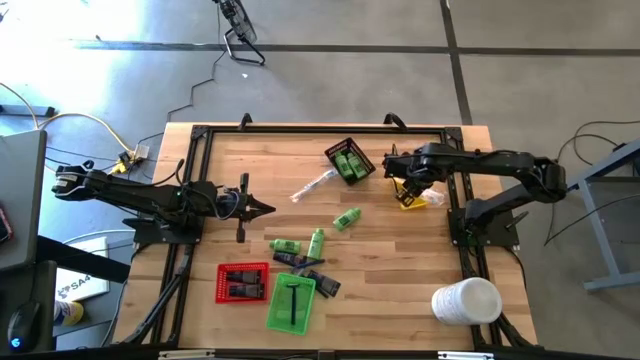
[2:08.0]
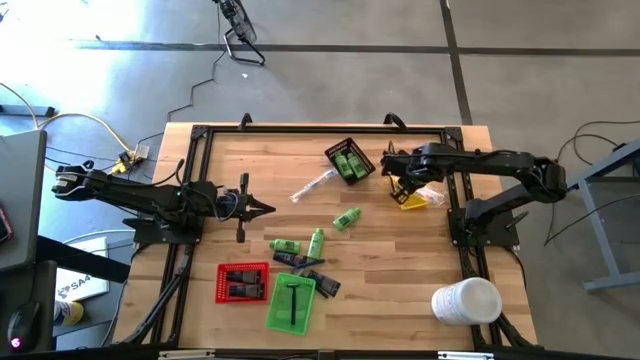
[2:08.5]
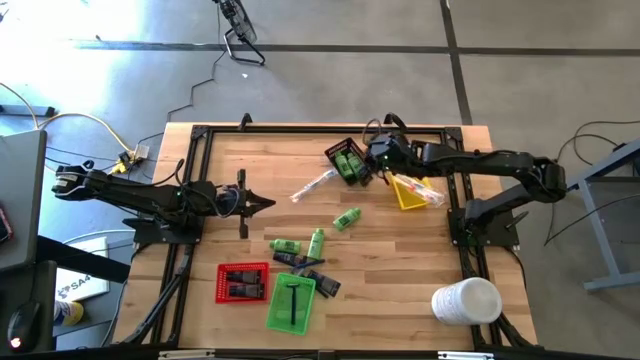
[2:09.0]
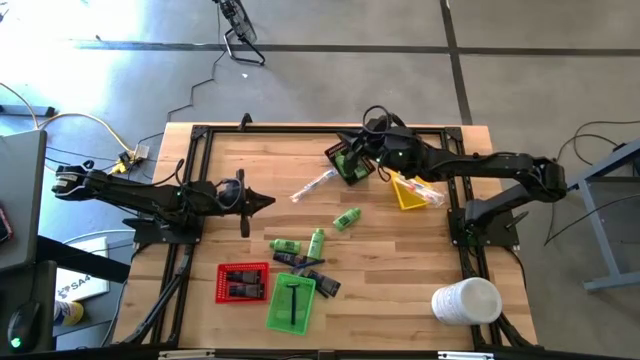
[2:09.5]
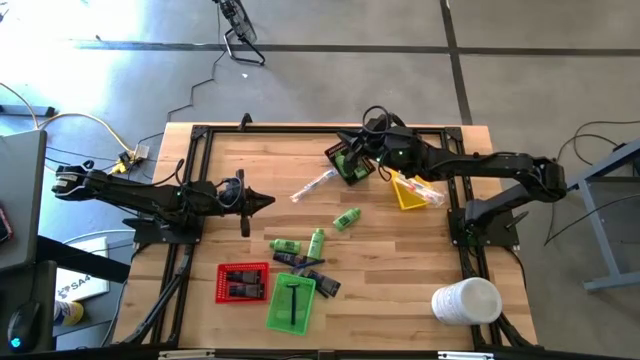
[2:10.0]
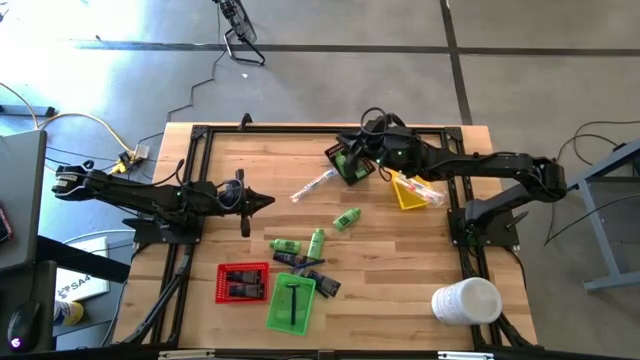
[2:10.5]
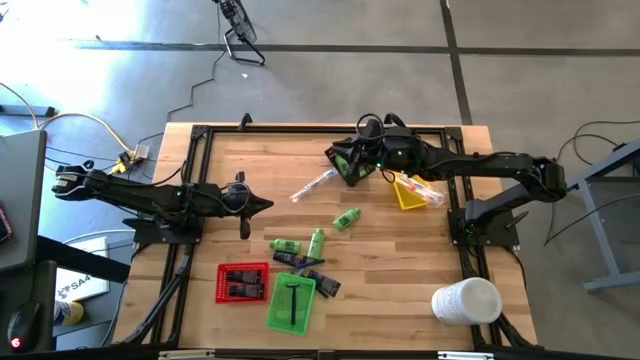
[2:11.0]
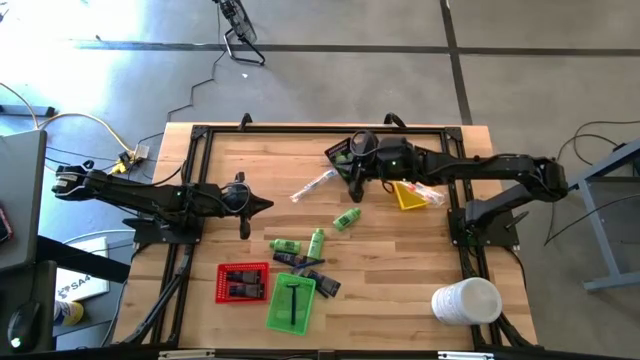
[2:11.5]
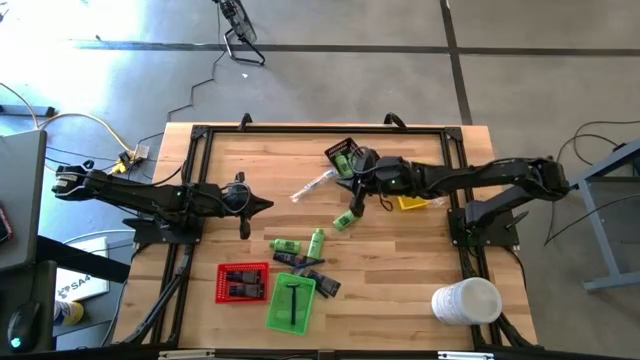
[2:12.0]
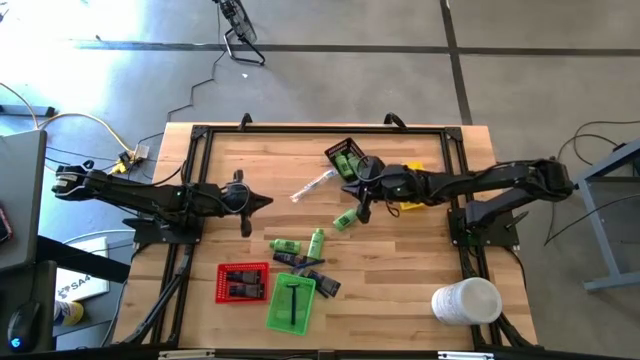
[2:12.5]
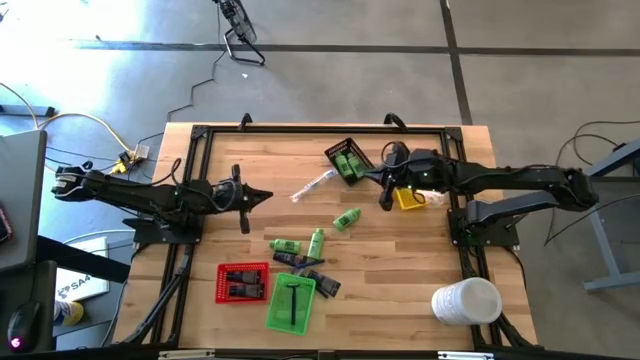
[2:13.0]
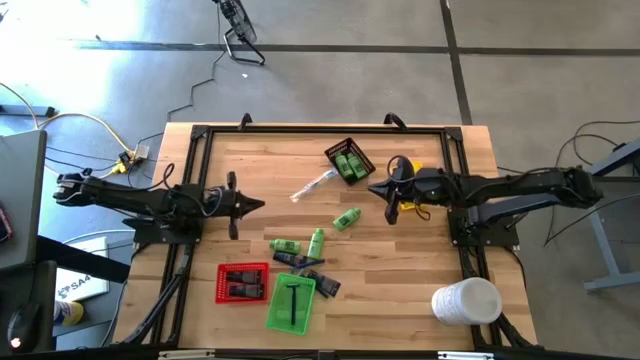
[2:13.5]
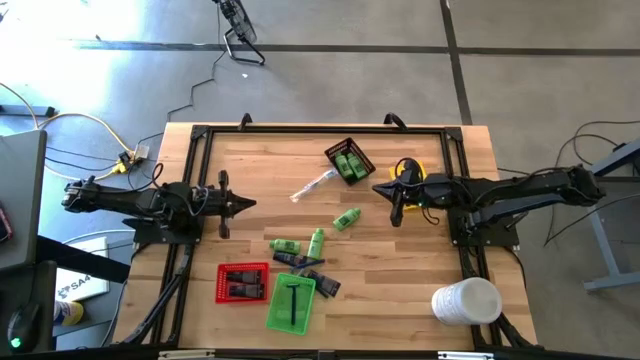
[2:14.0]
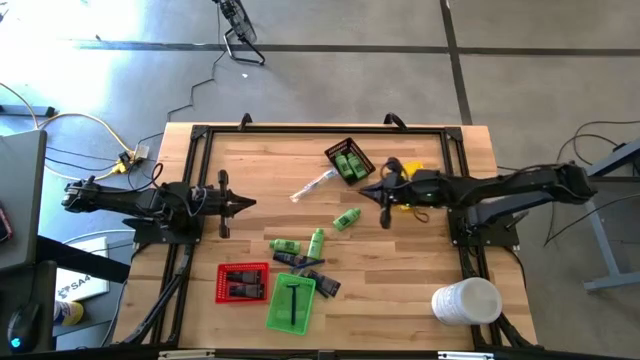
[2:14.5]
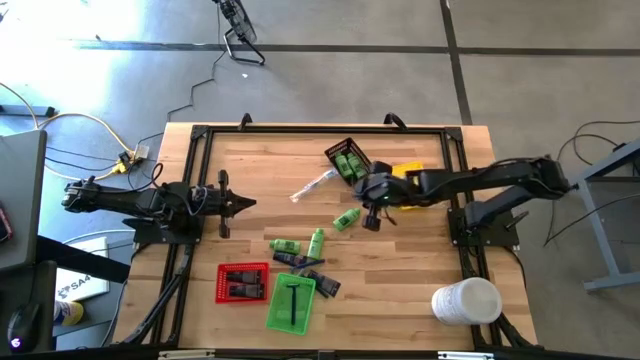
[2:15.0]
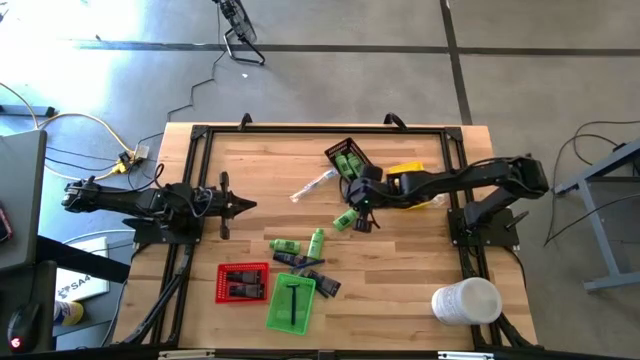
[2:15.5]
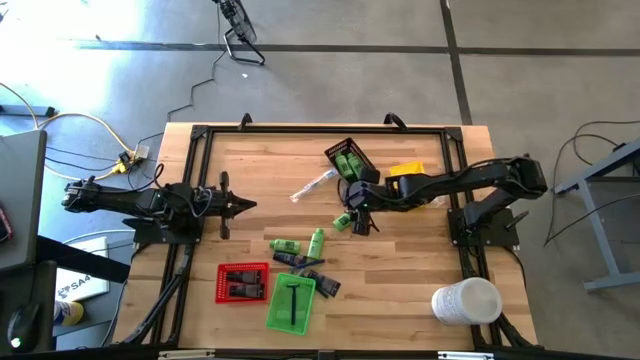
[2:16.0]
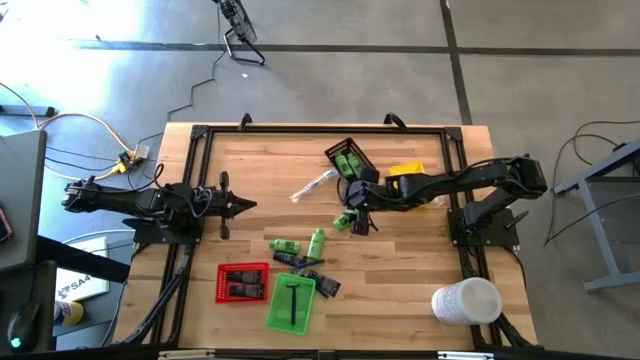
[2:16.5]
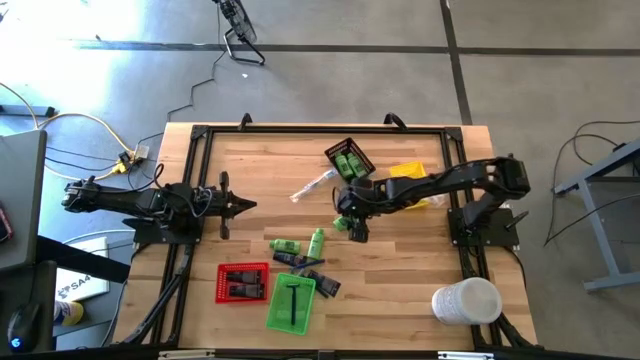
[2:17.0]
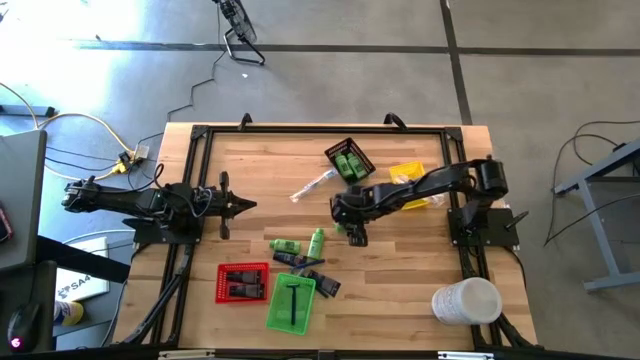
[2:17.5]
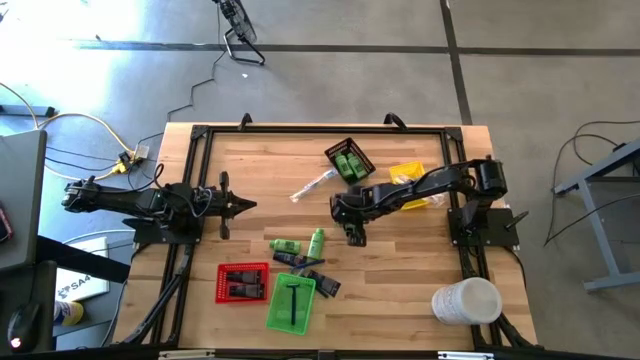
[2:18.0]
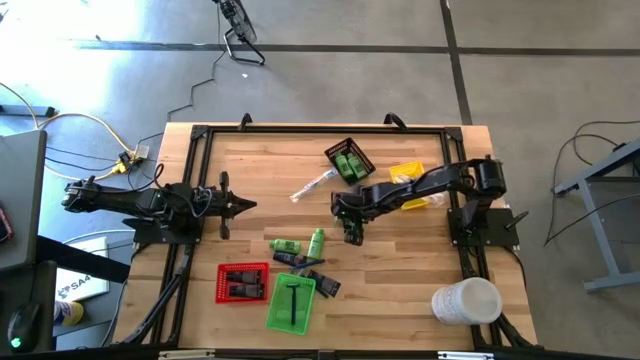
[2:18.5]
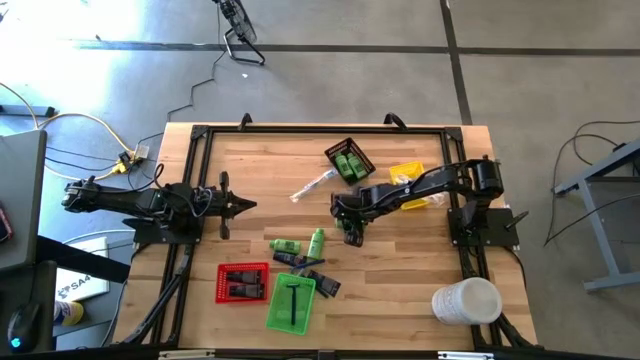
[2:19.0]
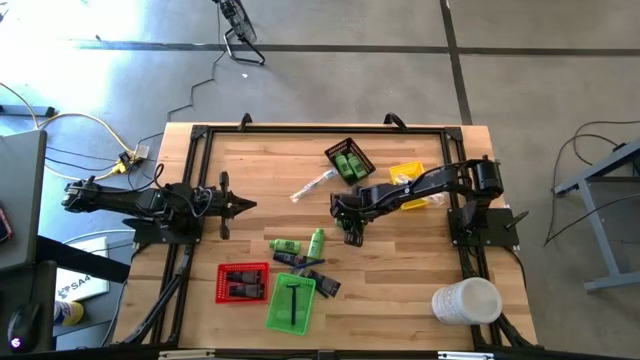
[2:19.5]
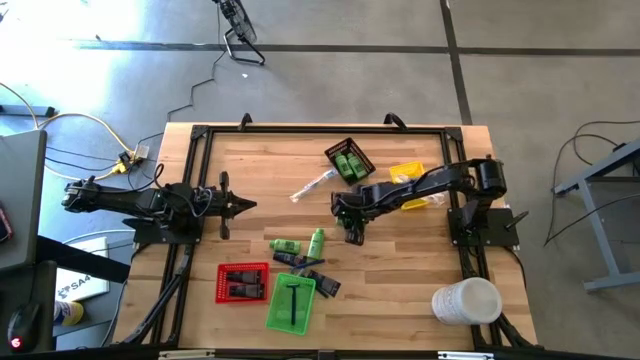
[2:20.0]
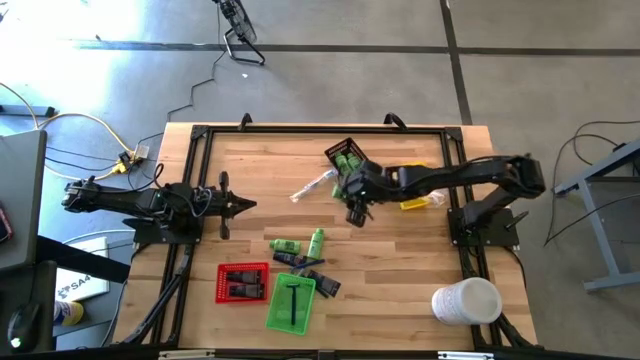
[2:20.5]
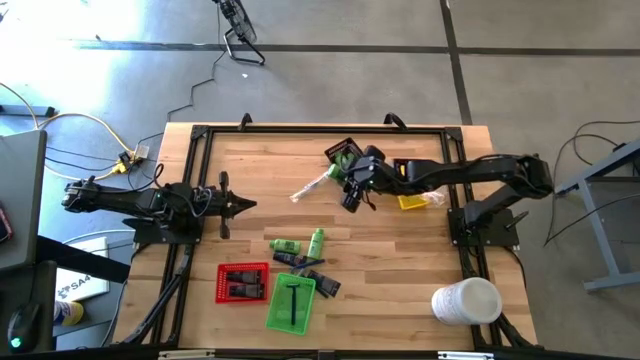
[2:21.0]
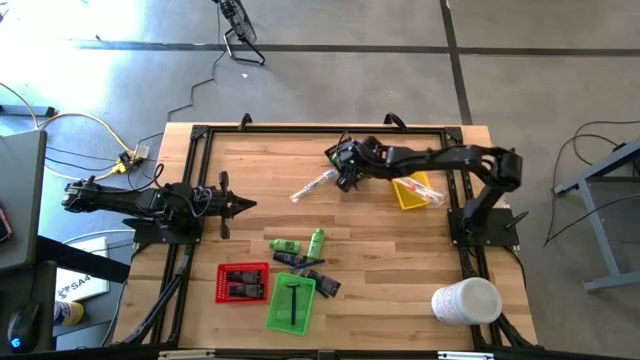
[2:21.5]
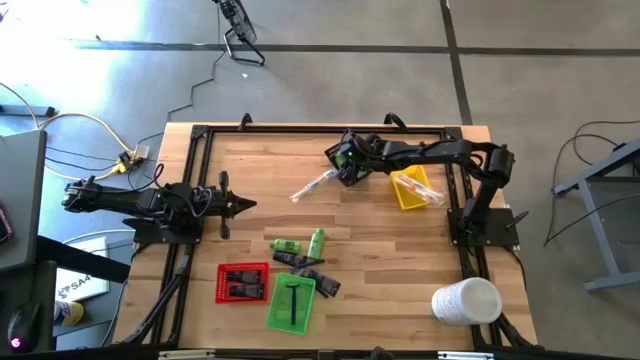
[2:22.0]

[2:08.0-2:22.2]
Task: Pick & Place Travel size toiletries
Put the shampoo into the black bin

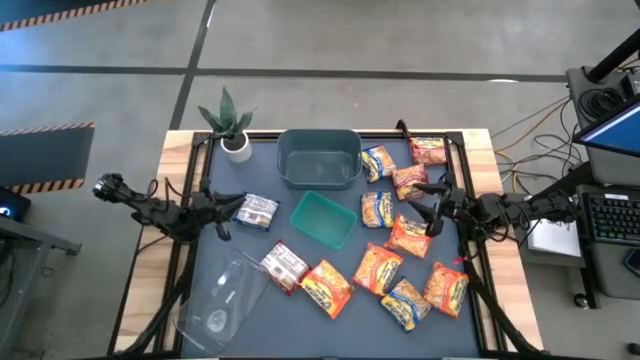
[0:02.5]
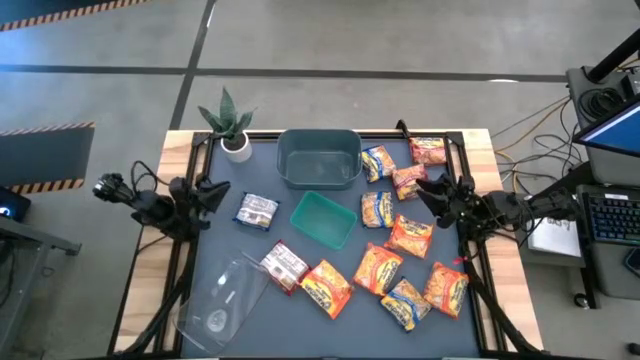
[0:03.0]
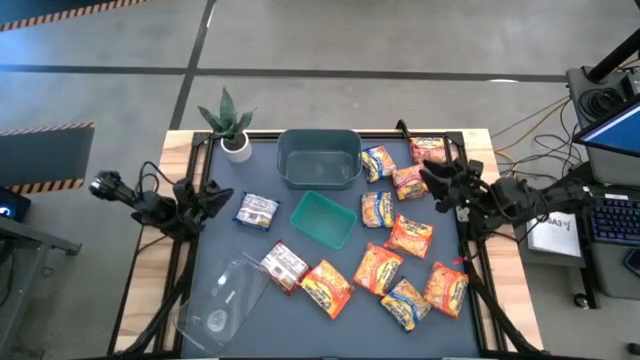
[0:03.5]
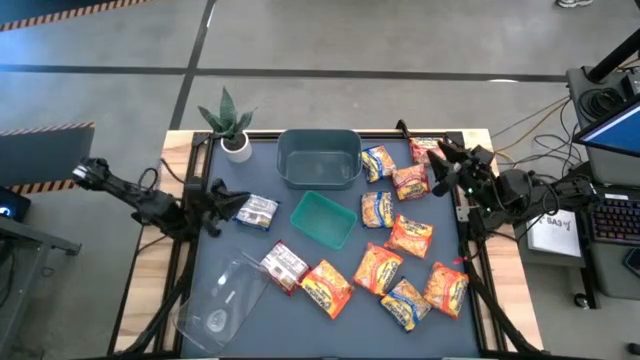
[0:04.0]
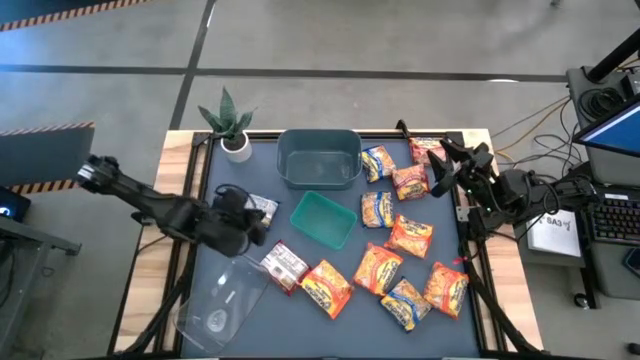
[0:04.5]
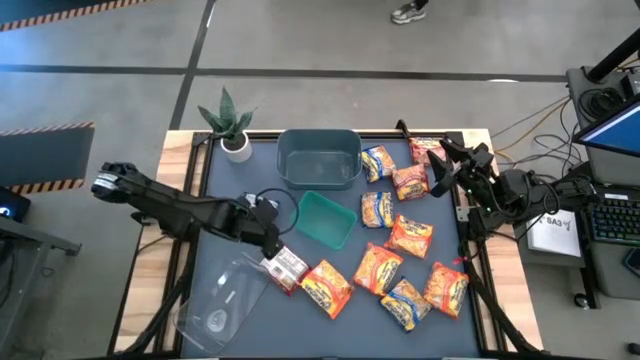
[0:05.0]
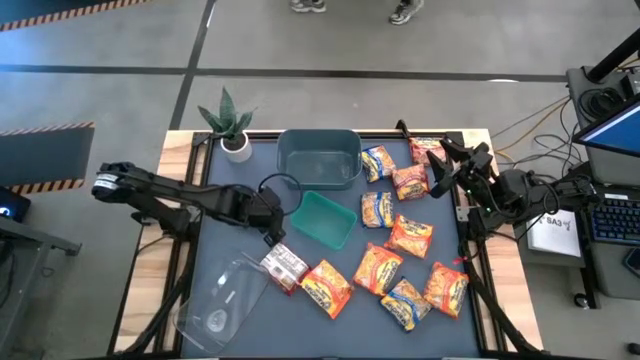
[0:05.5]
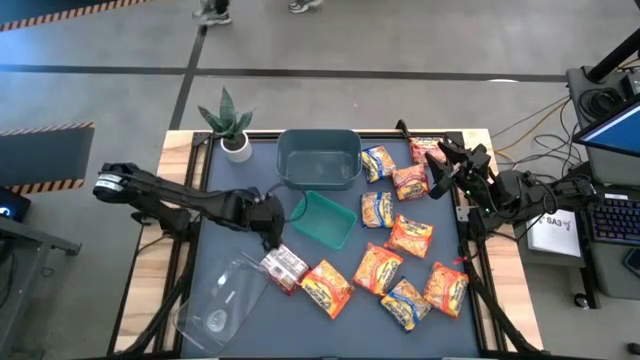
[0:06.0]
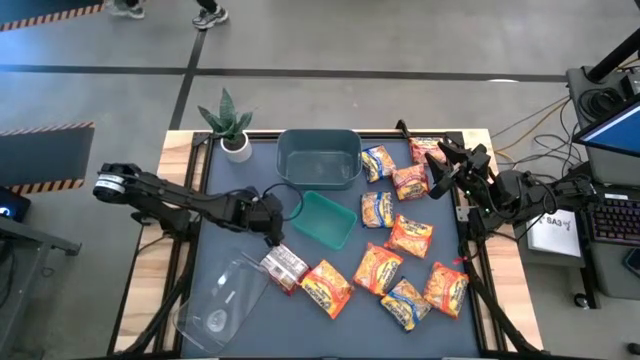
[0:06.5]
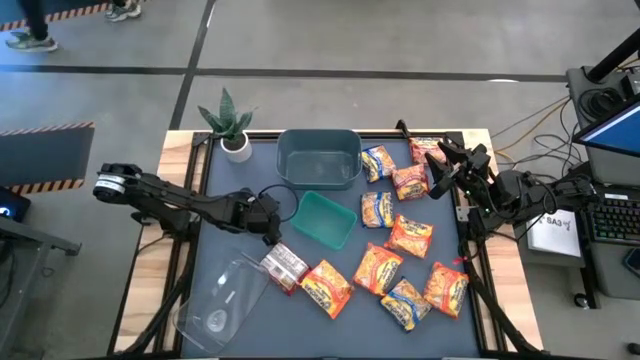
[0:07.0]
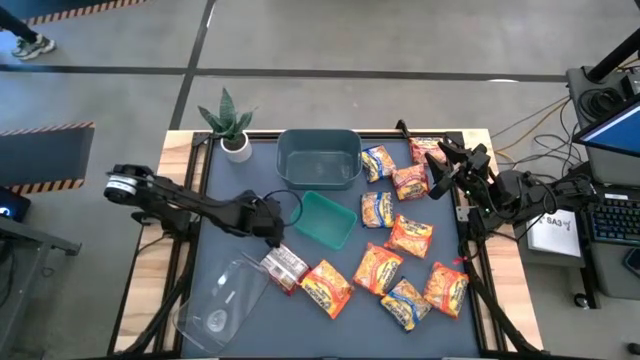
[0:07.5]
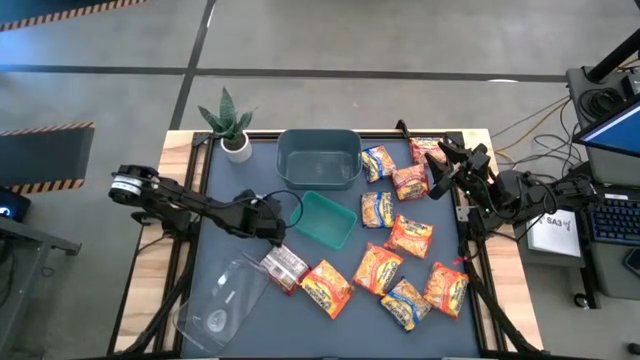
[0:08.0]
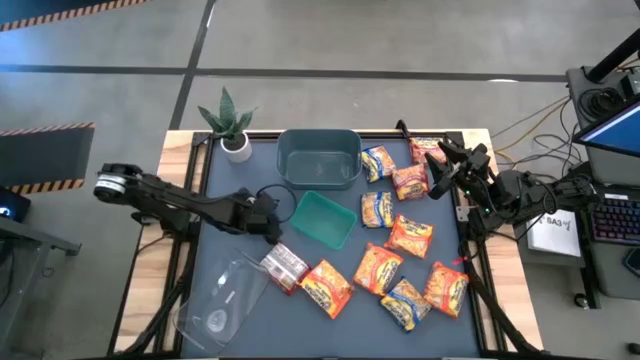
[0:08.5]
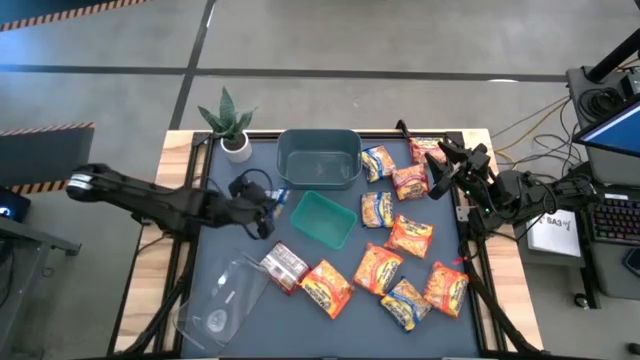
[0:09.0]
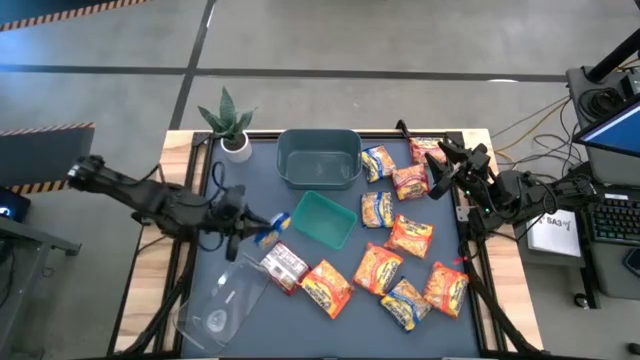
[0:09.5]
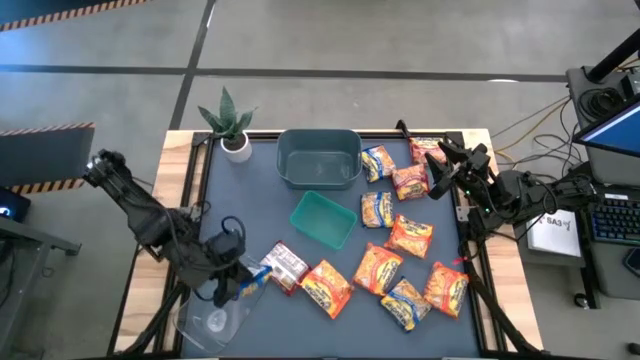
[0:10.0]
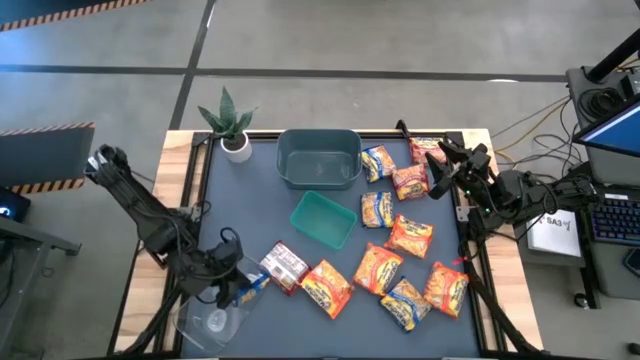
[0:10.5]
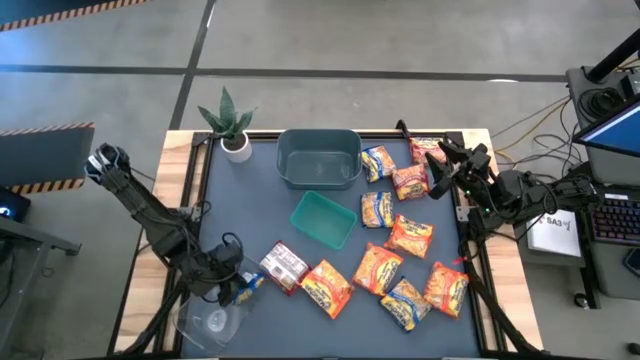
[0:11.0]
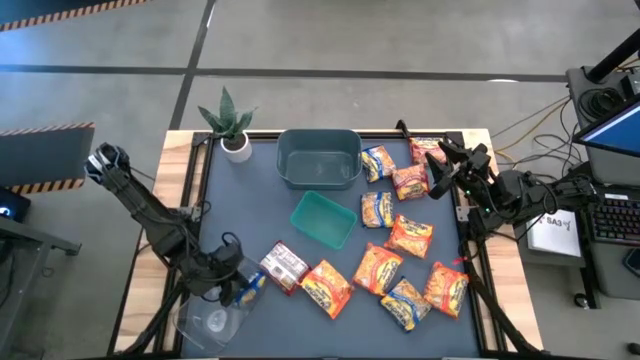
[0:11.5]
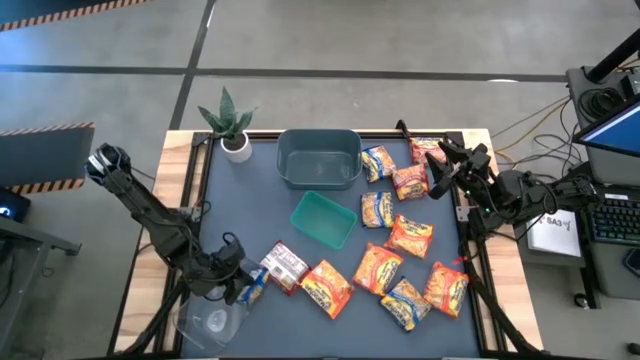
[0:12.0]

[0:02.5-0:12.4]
Task: Sort Maruchan noodles
Put the blue noodle pack into the transparent bin
